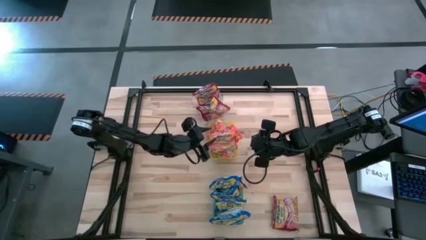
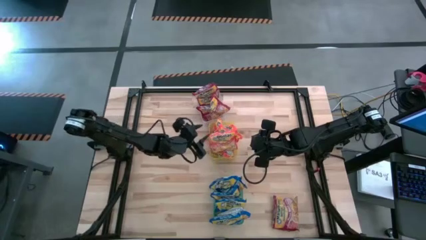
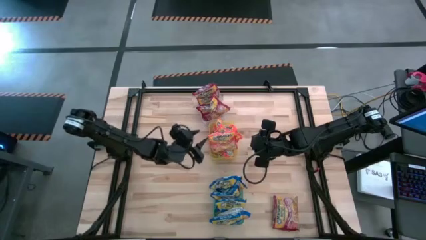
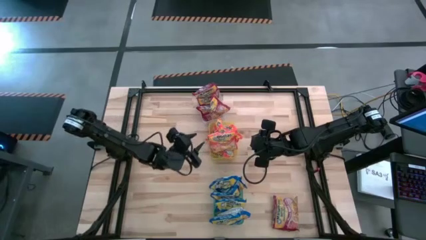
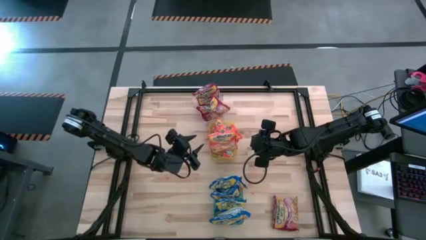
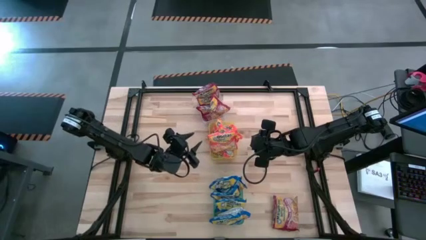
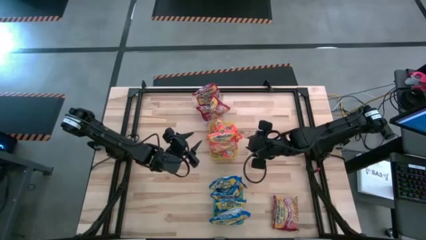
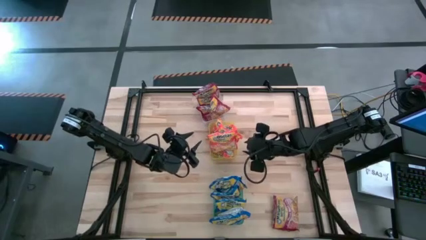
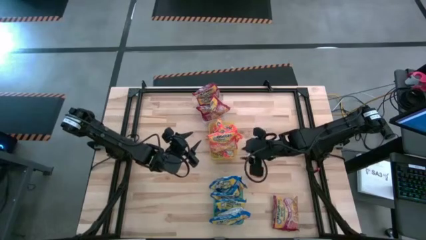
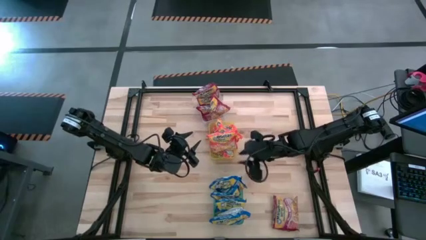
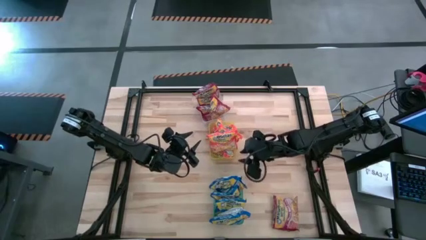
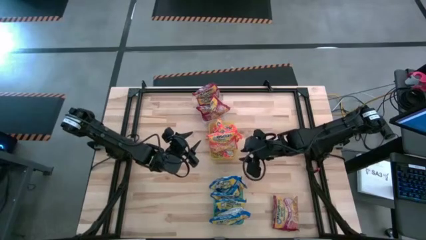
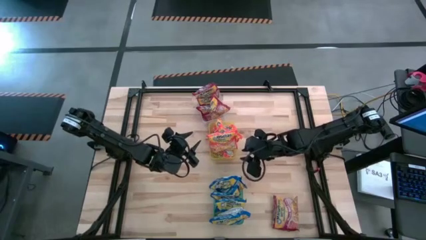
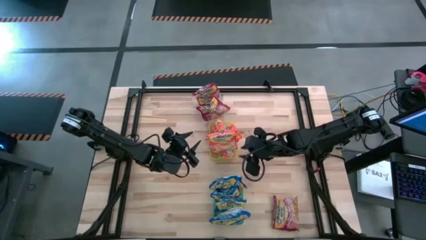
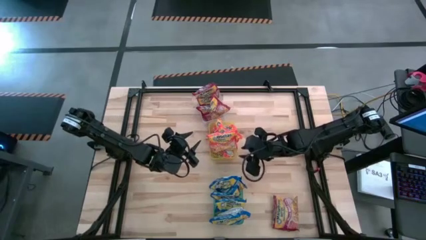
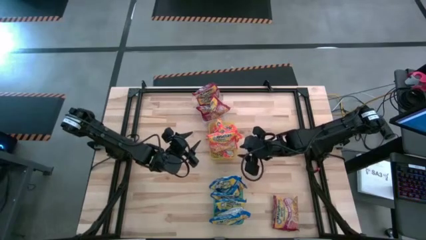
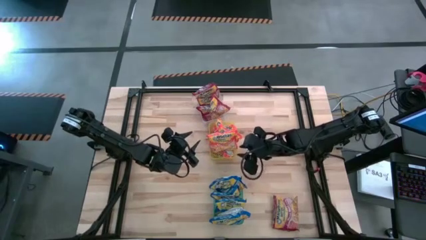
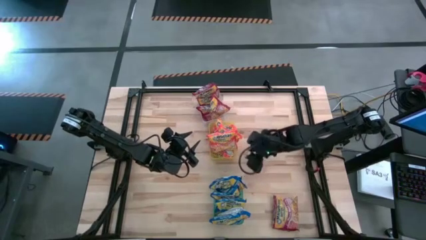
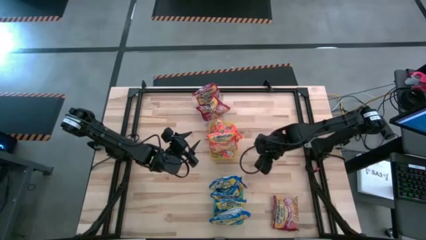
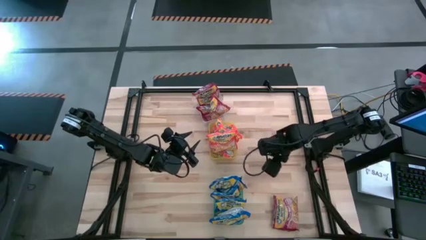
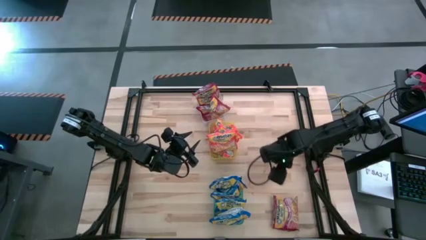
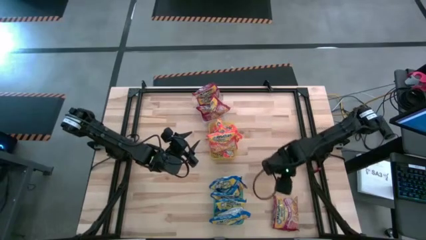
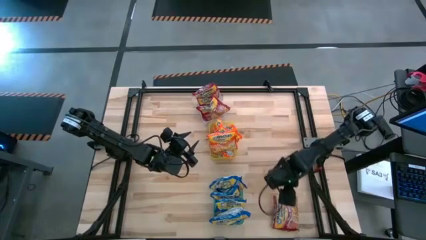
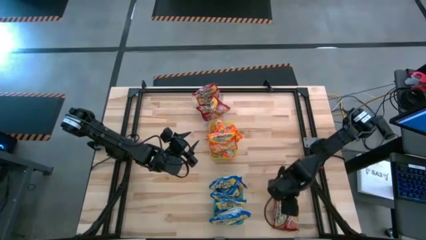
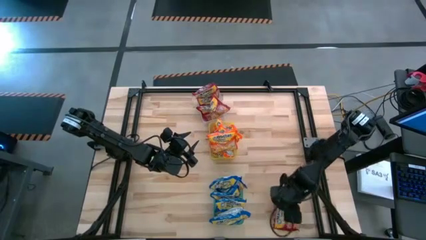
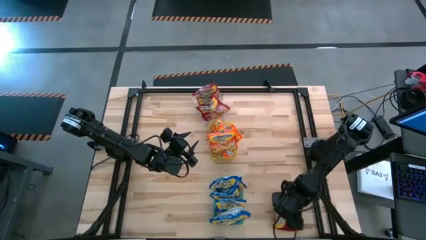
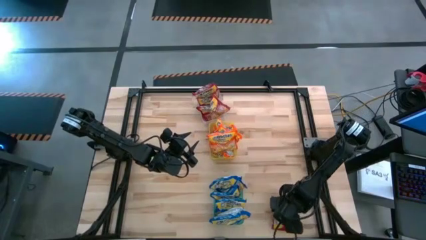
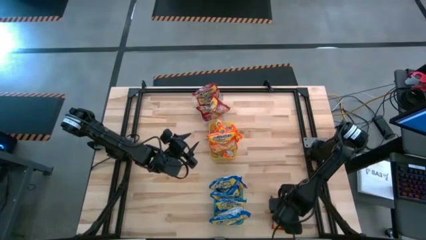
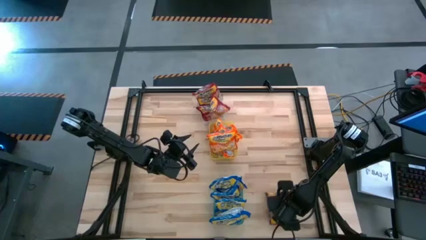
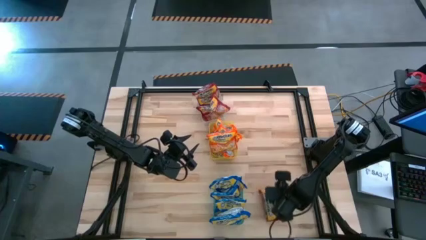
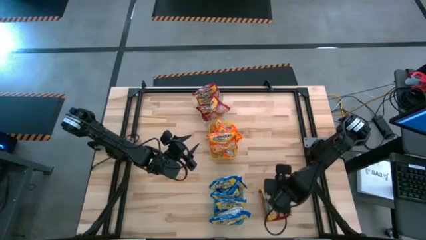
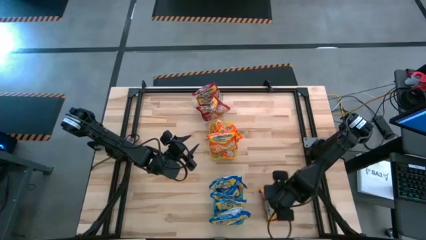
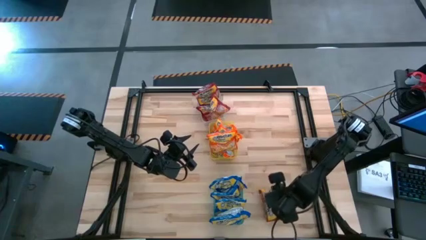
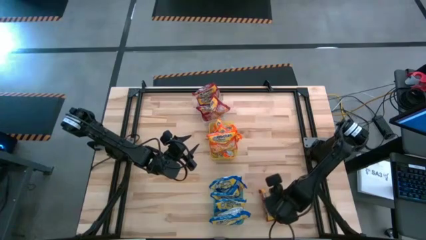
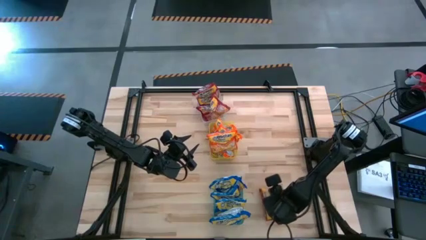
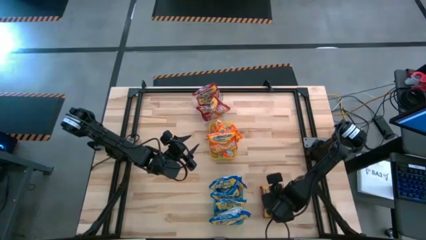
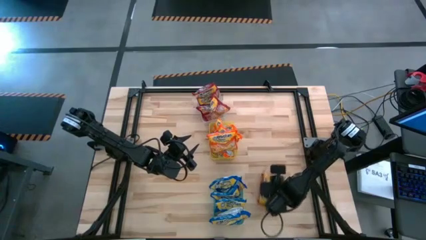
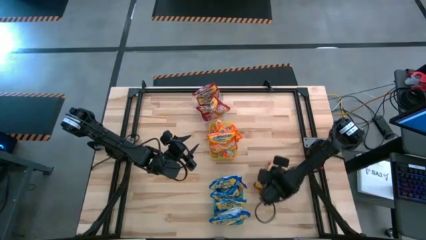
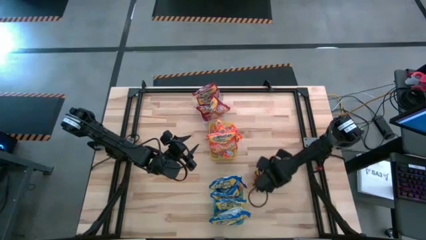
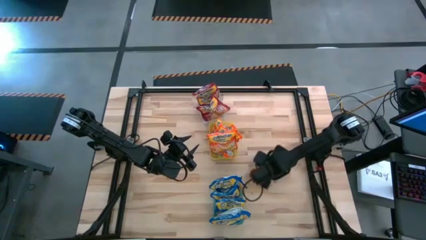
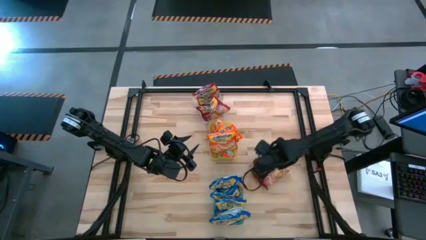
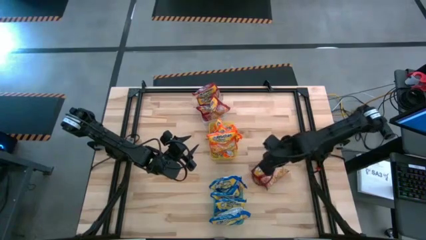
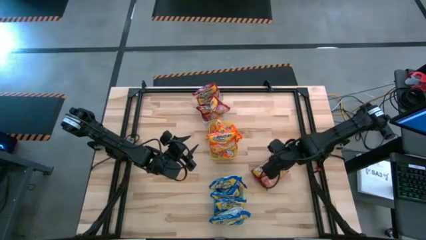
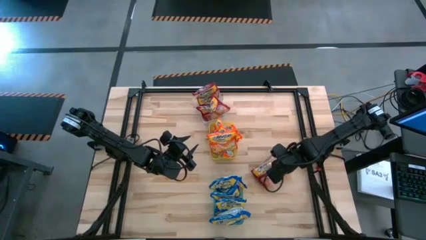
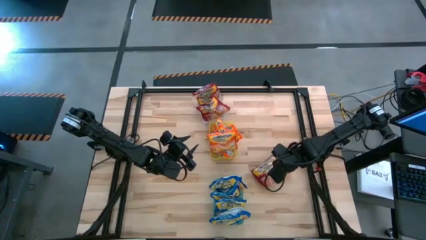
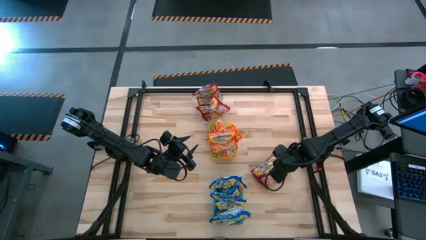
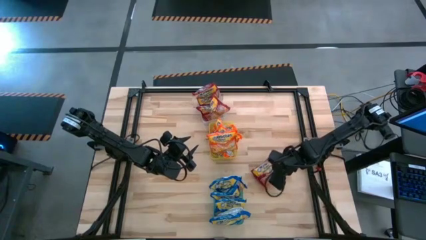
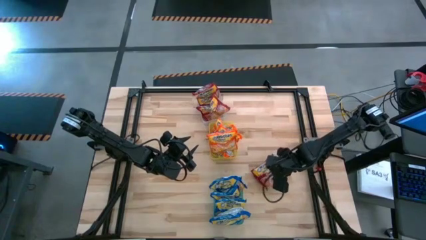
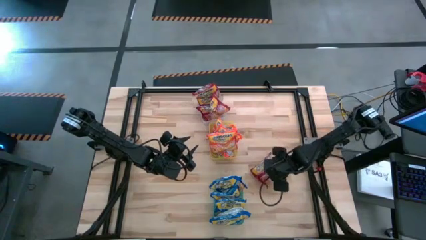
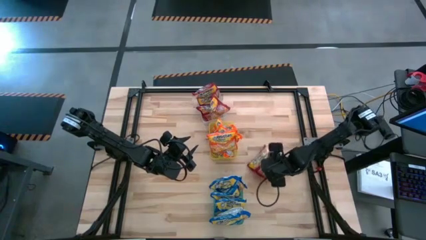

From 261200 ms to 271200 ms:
Task: Sort Maruchan noodles
Put the red noodle pack into the transparent bin

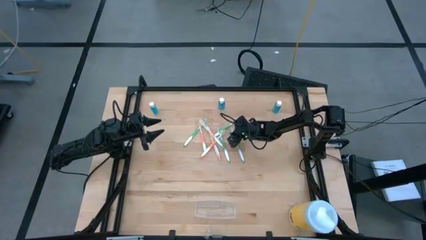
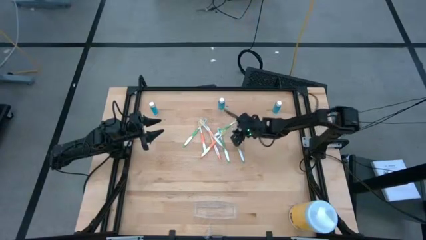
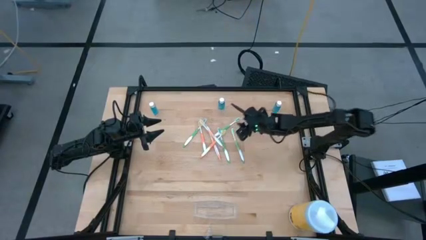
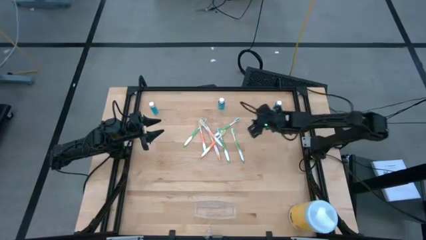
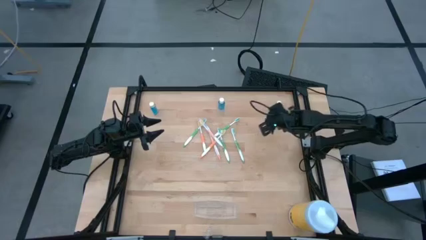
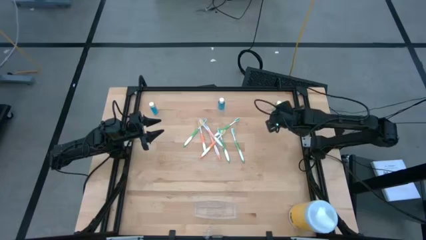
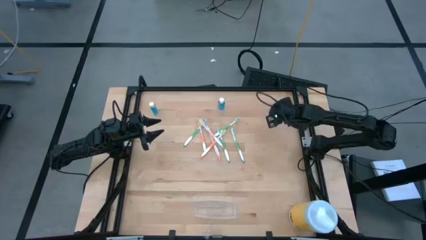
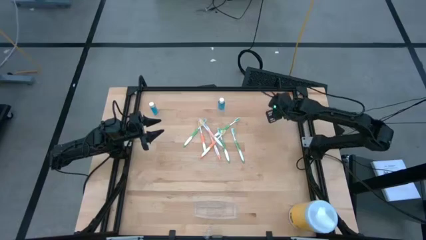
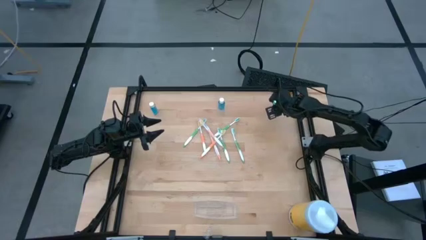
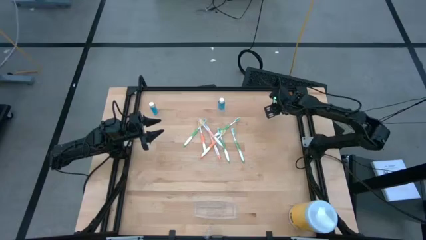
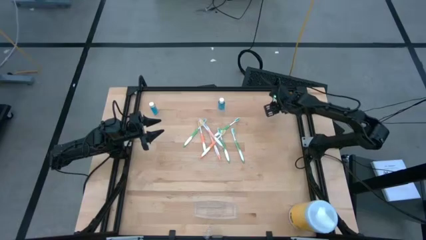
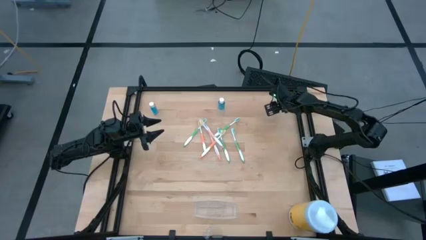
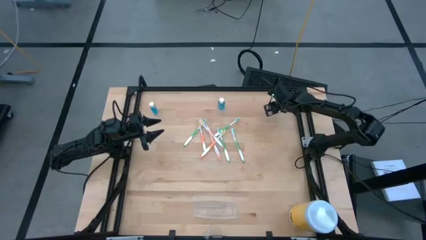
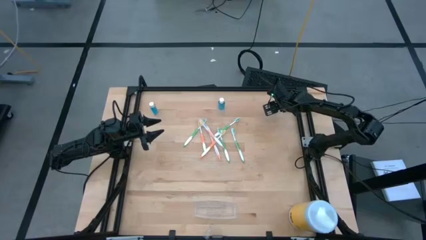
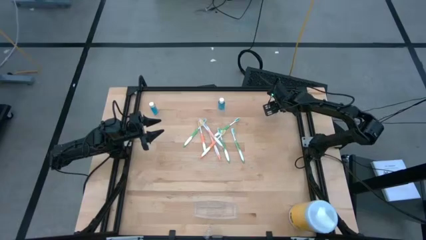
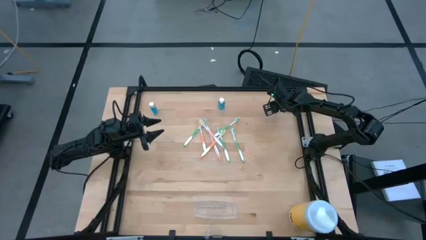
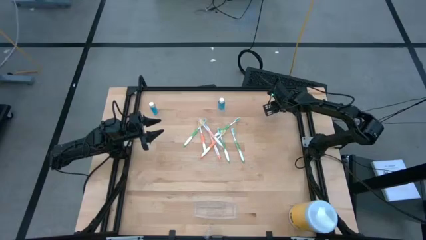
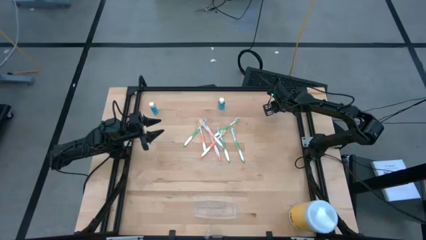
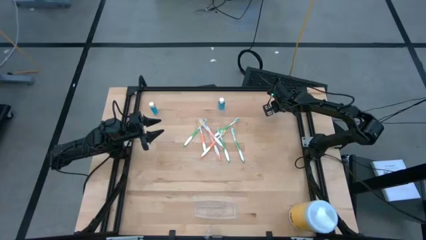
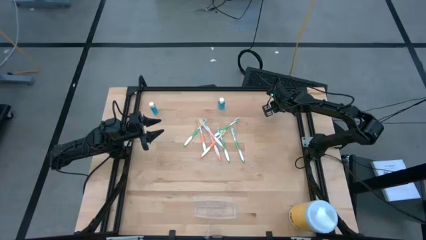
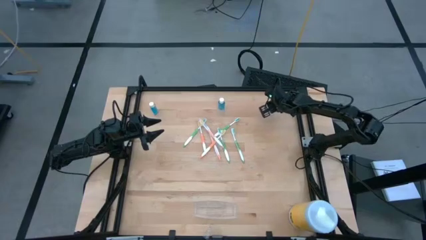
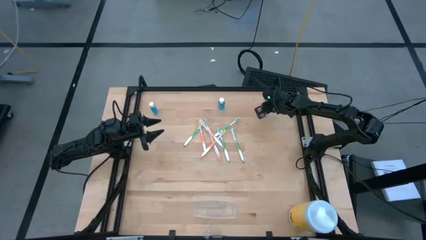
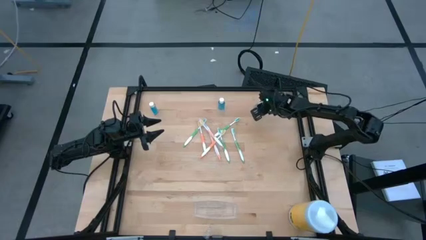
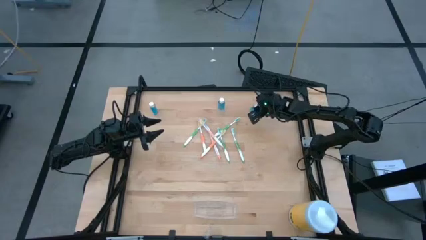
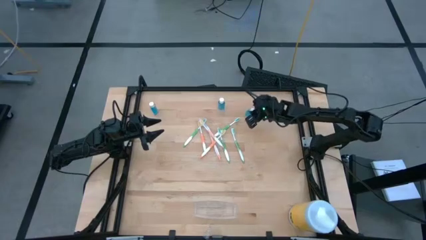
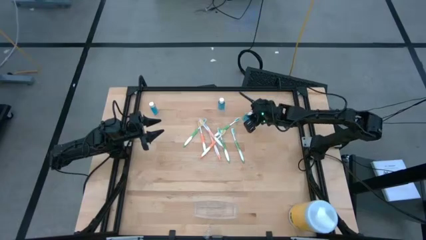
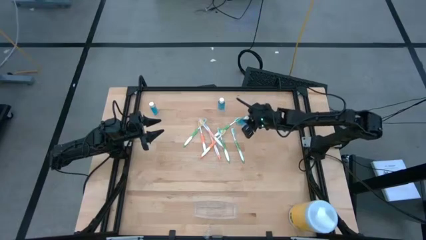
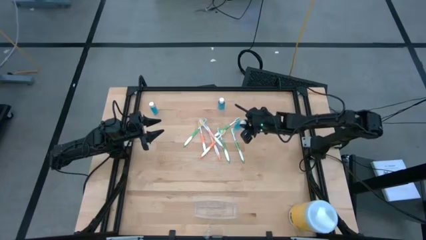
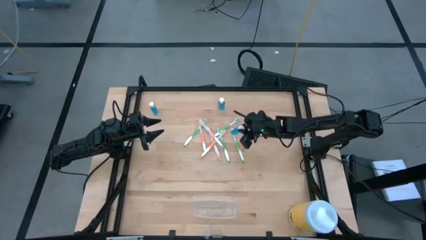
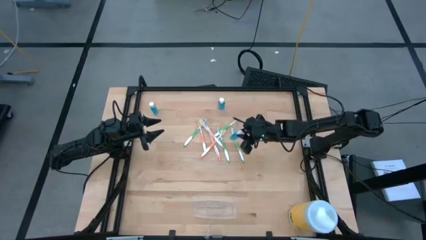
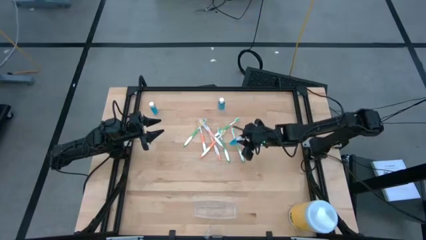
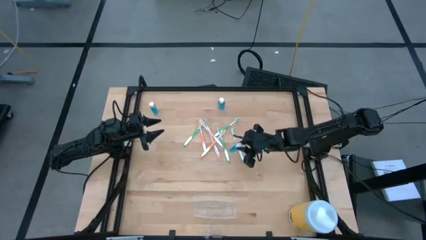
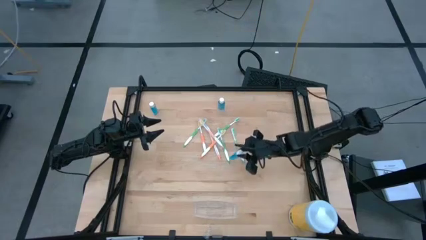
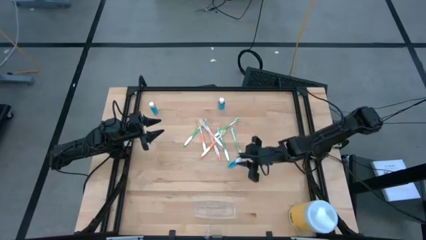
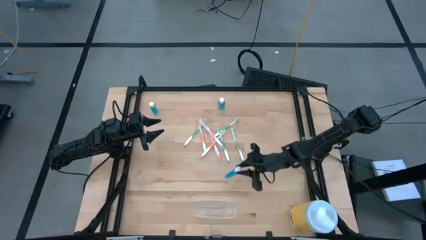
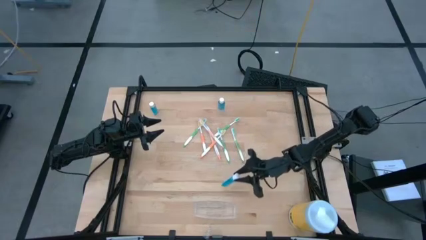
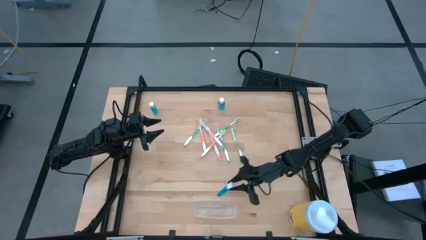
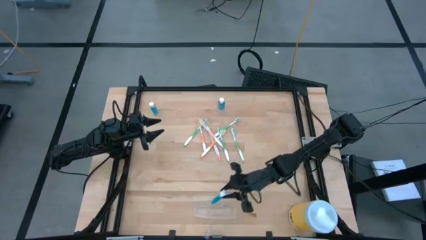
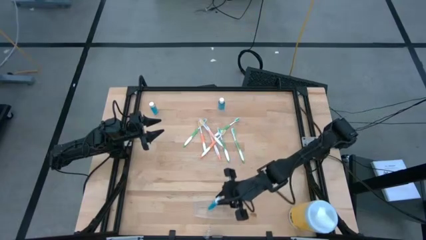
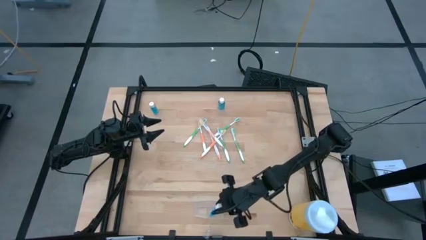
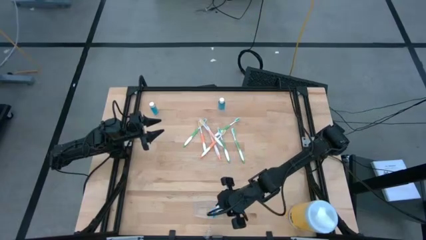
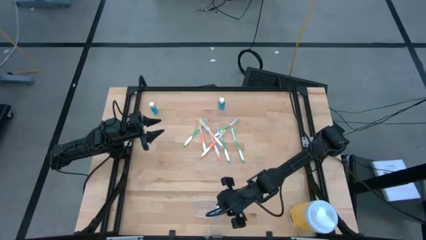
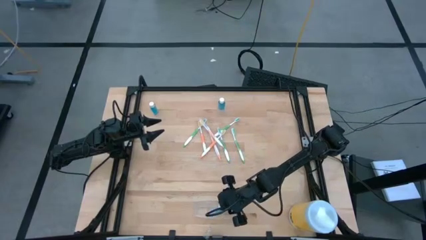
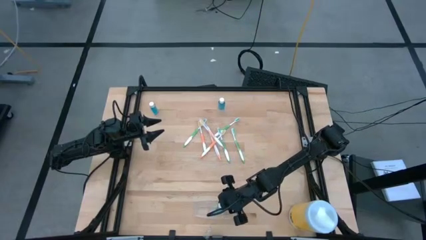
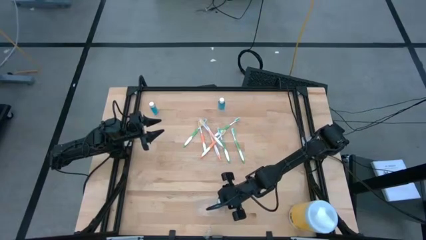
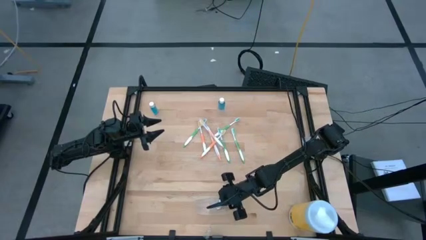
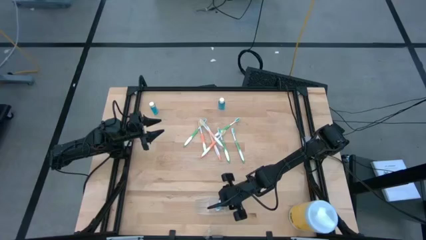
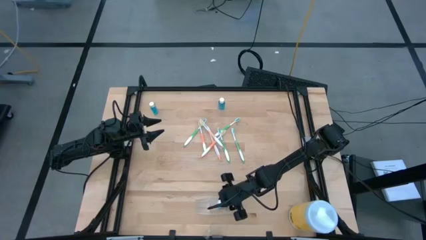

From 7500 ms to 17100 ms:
Task: Pick & Place toothbrushing station
Put the blue mouthwash bottle into the transparent organizer
